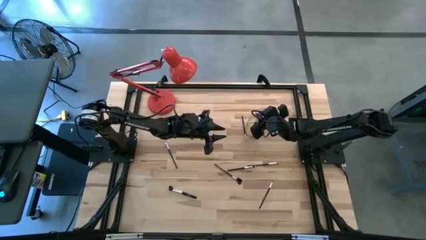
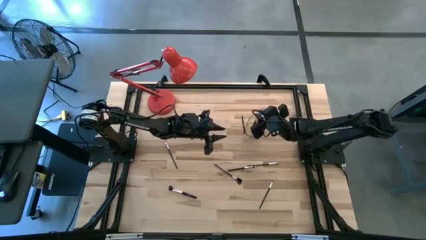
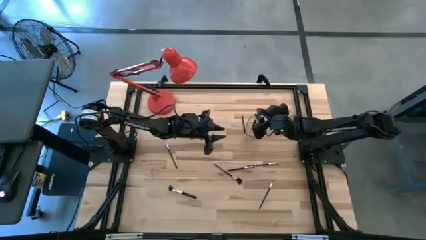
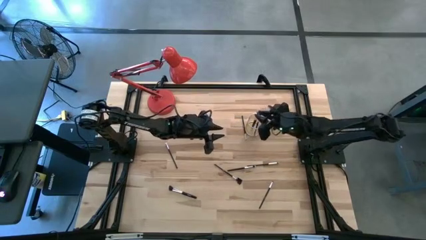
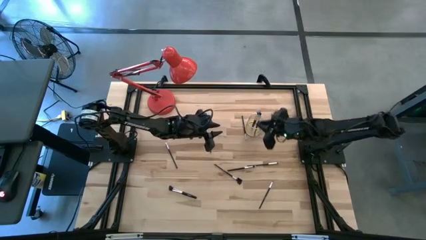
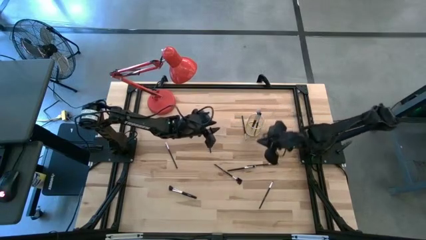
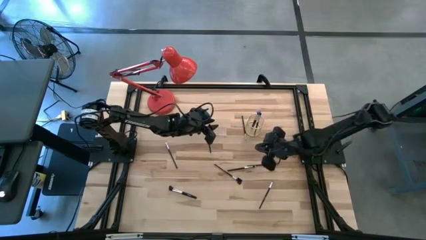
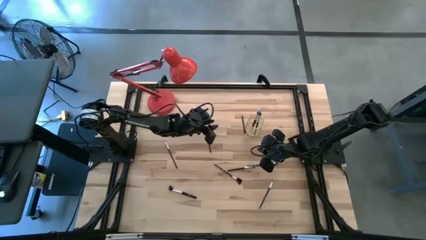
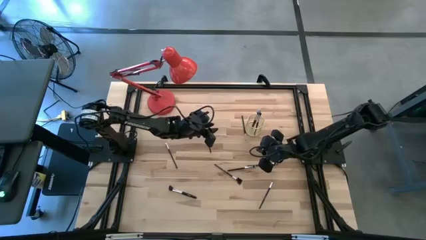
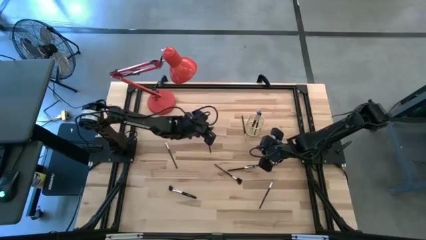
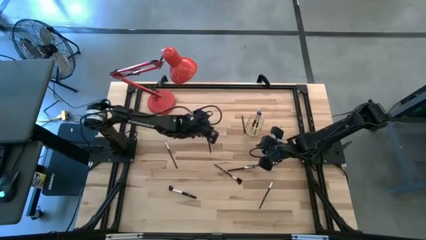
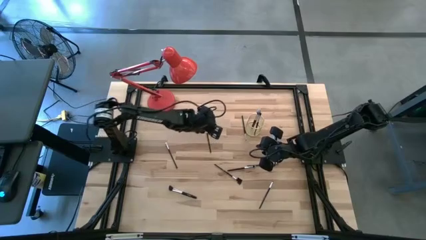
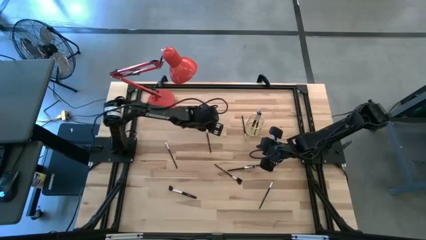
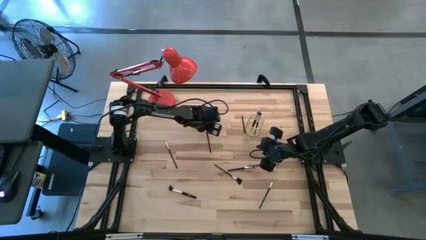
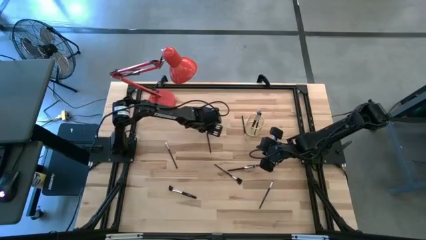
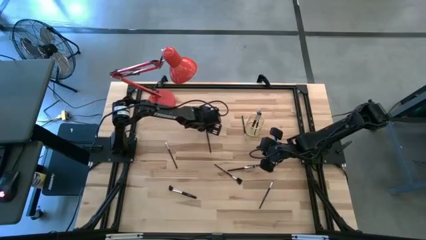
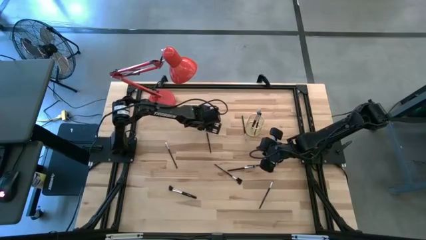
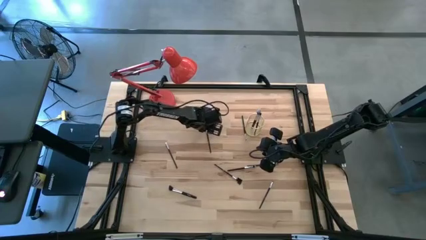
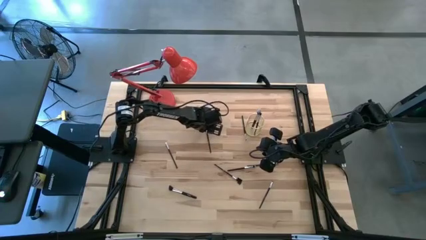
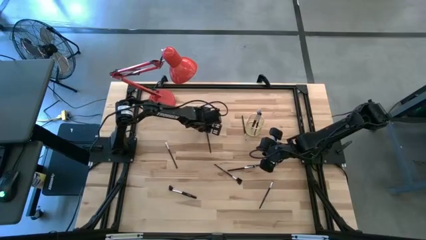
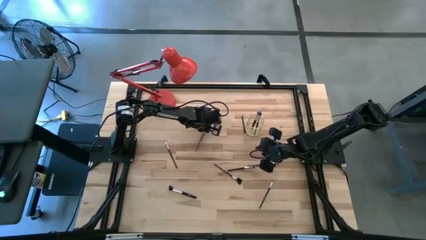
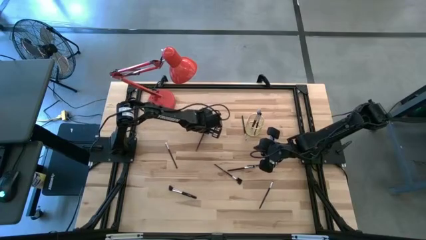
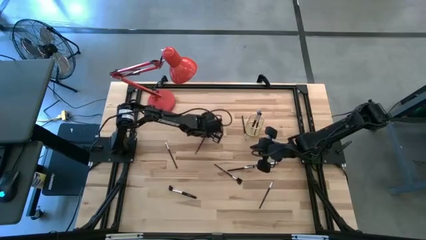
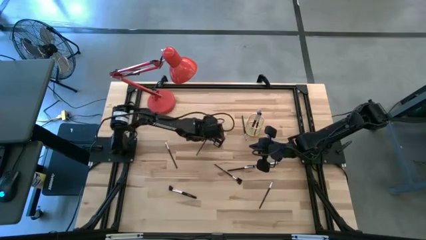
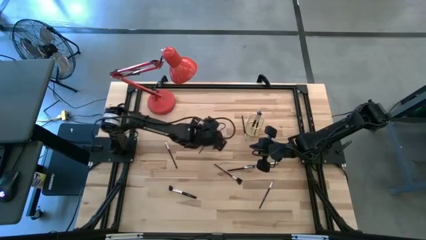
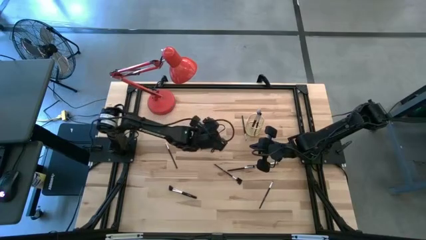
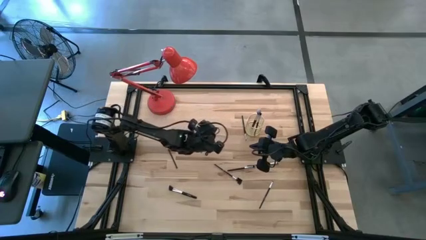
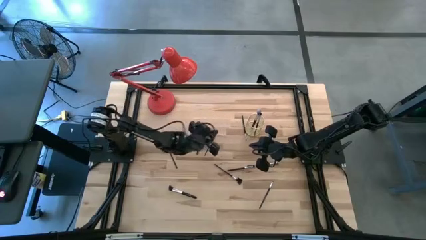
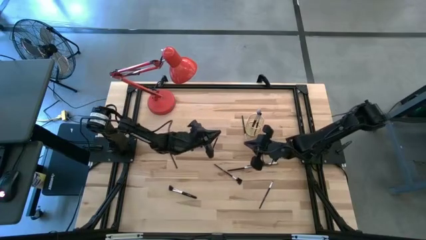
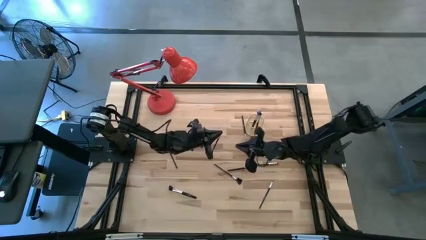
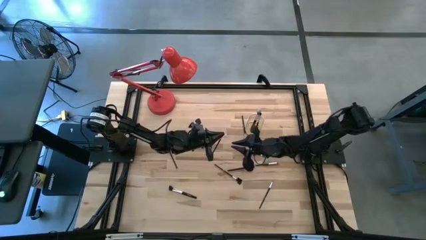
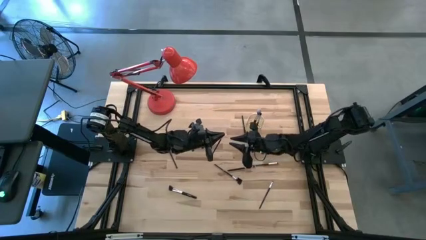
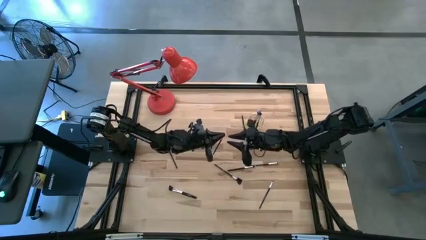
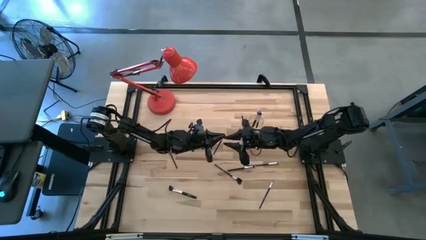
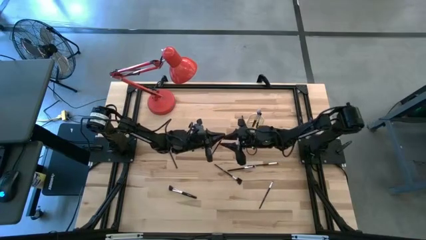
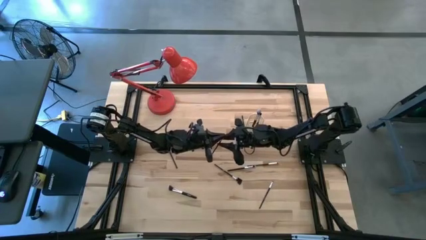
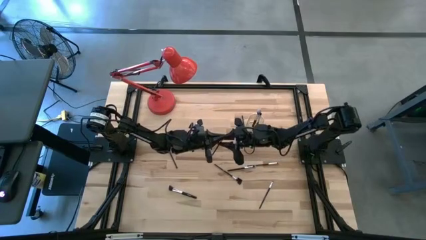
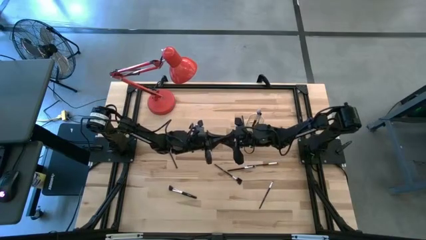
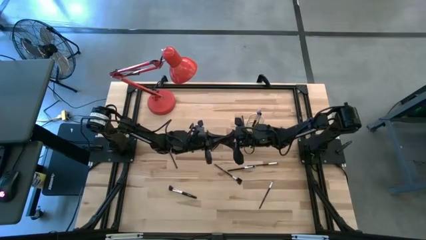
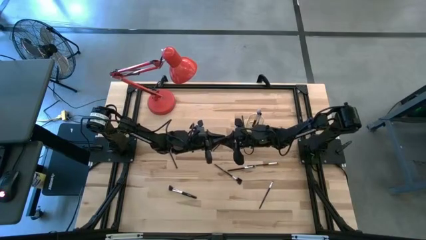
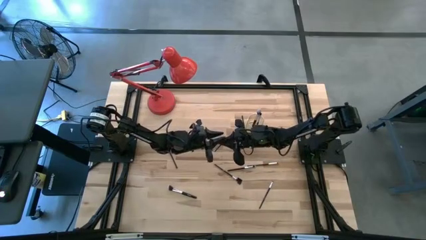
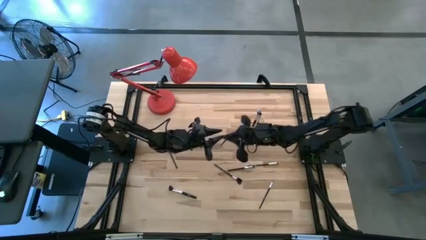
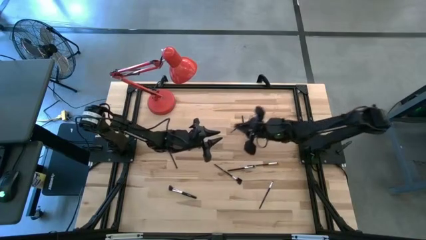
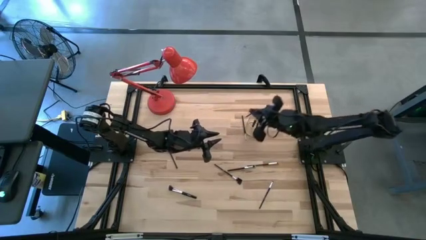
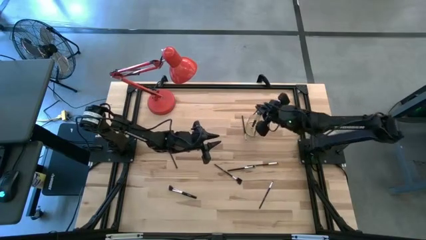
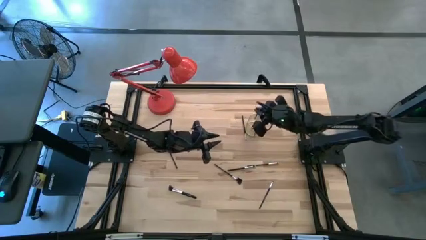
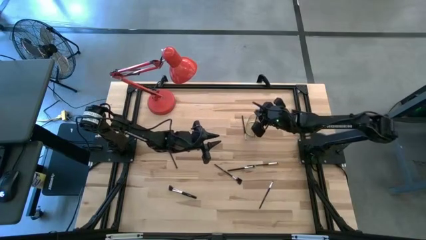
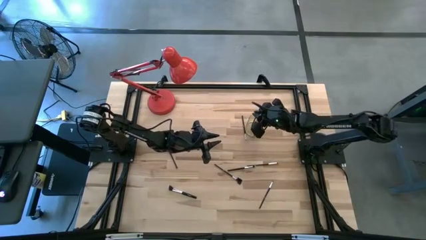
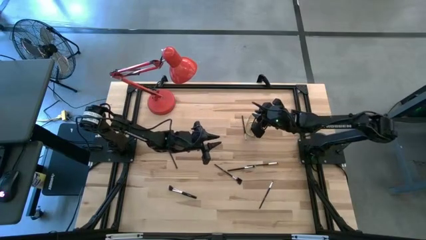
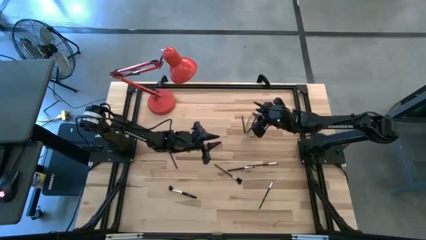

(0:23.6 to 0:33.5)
Task: Put items in baskets/containers
Put the black brush into the gold holder

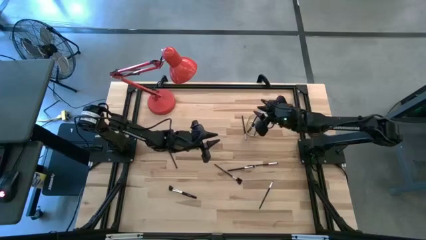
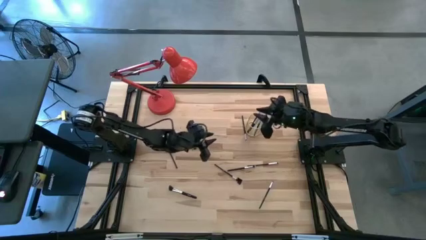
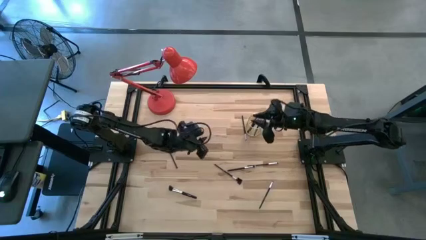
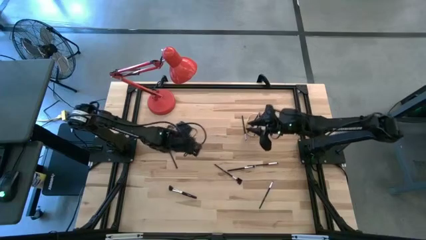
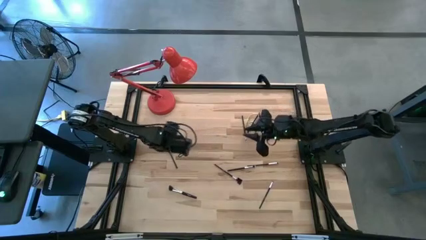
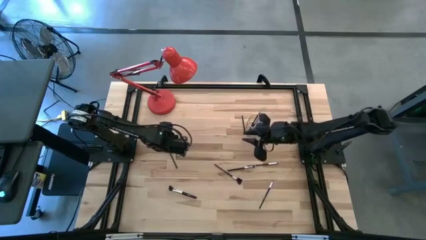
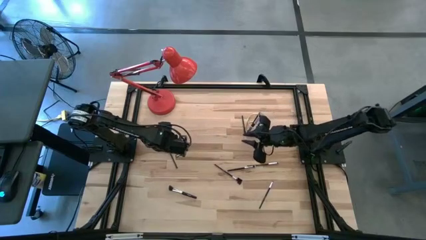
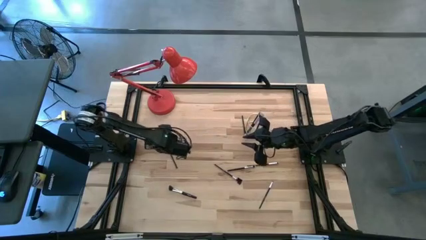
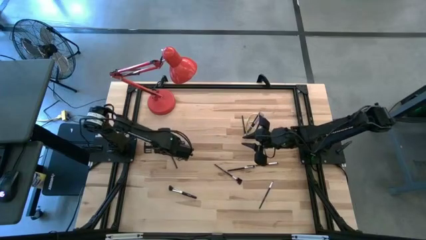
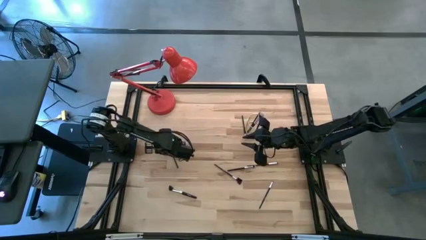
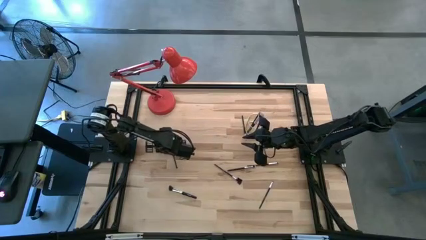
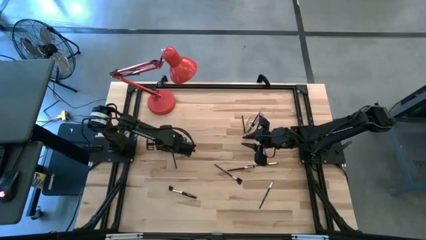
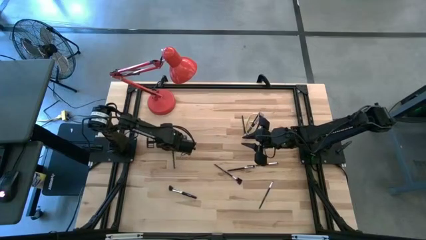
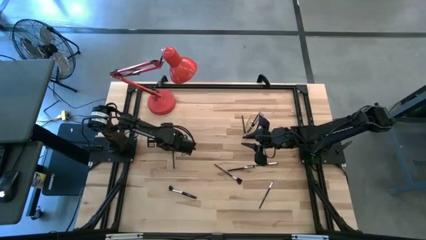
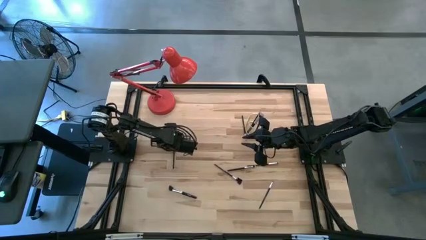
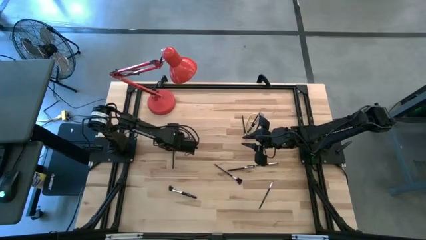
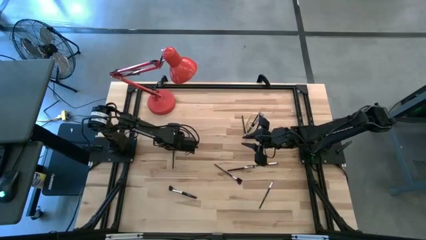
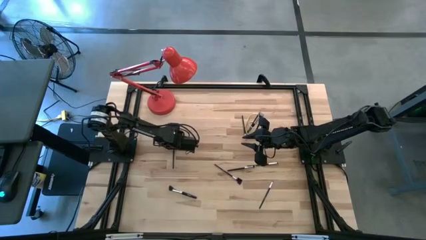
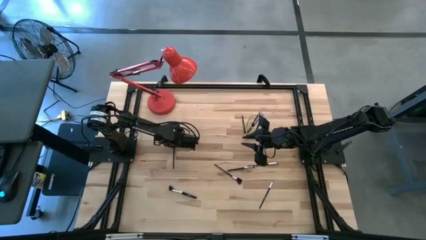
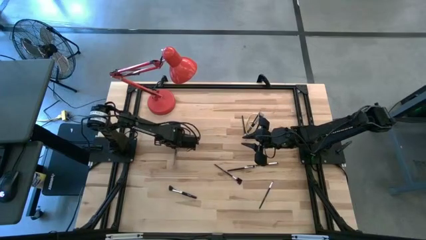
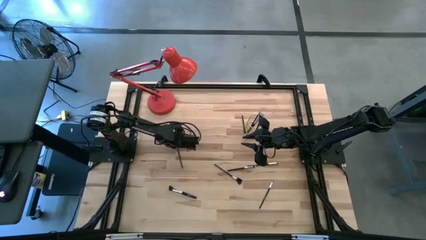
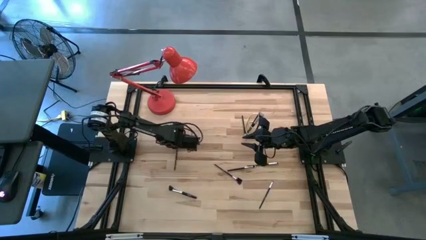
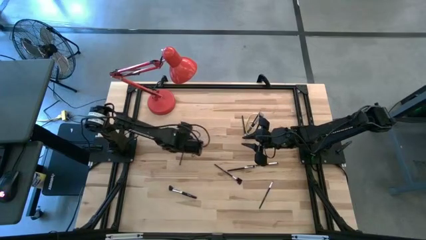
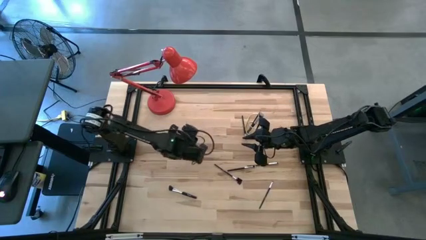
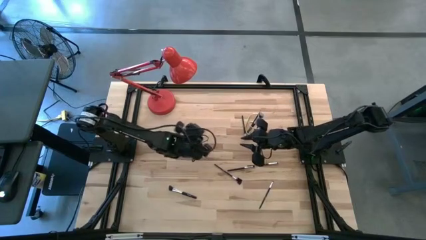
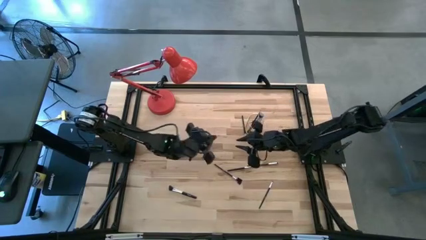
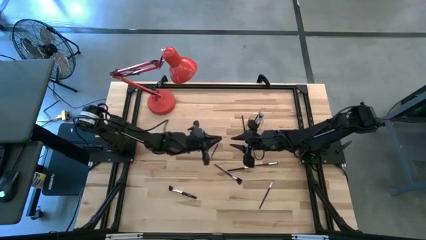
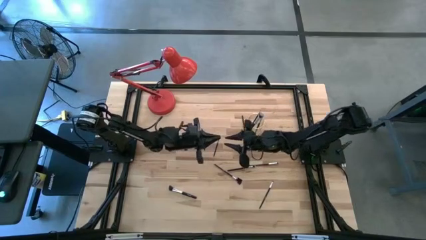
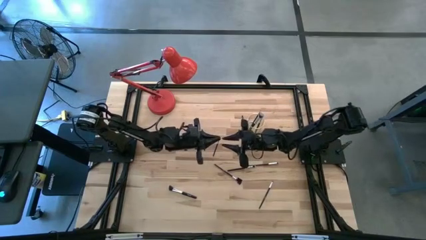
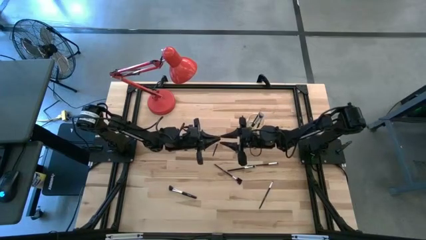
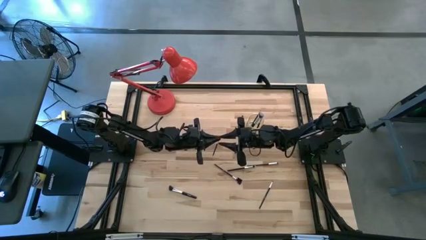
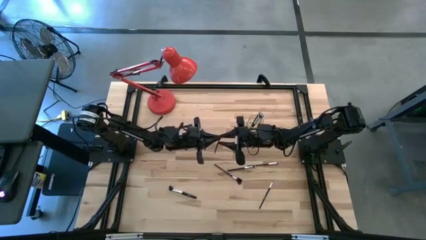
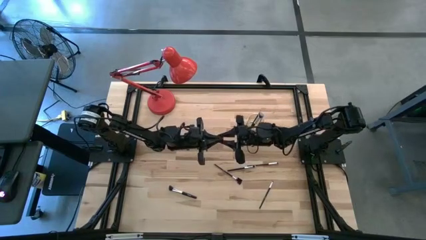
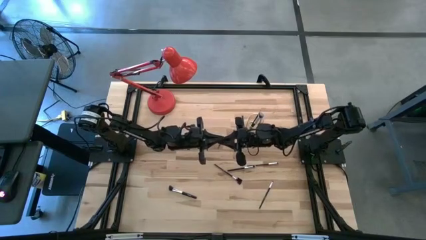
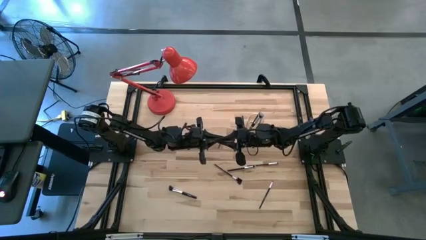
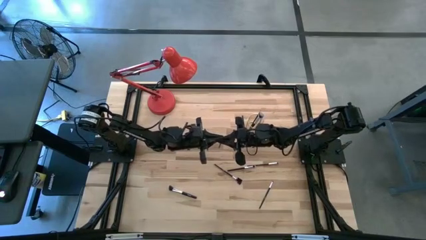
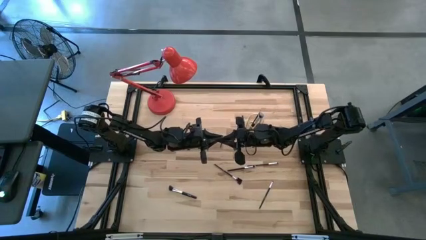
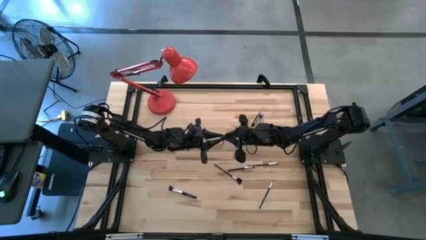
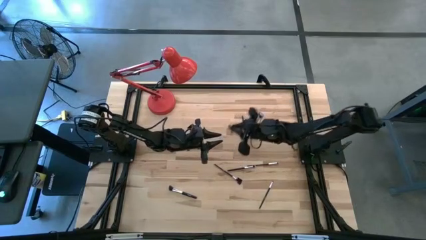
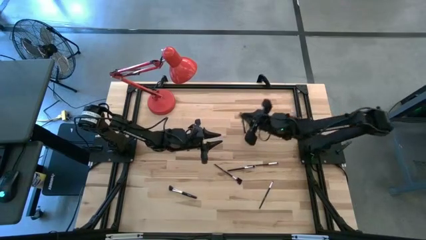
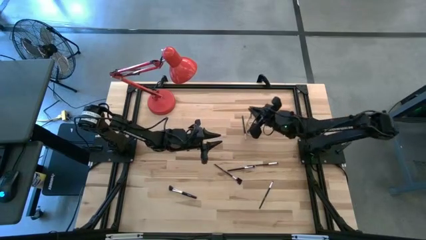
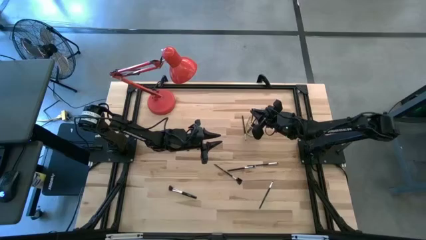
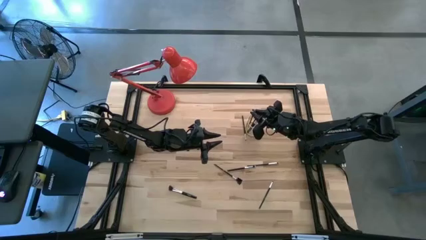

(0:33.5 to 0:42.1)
Put the black brush into the gold holder
